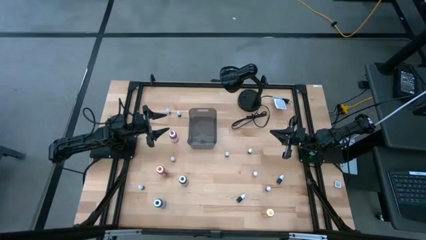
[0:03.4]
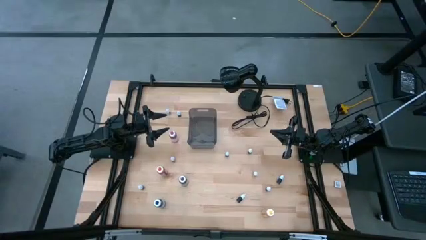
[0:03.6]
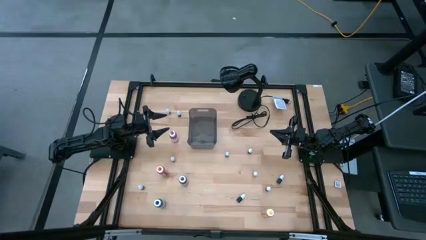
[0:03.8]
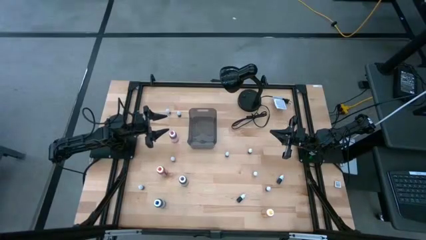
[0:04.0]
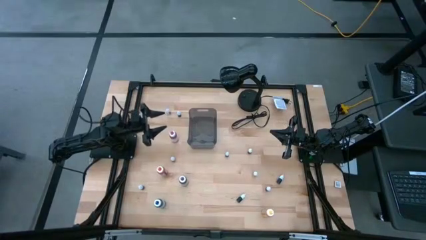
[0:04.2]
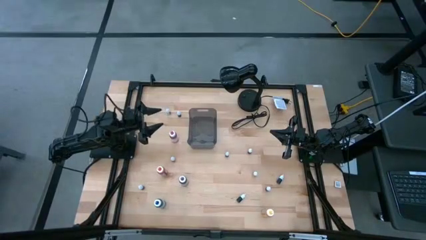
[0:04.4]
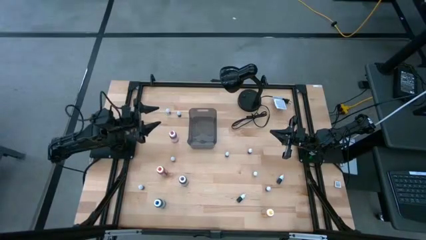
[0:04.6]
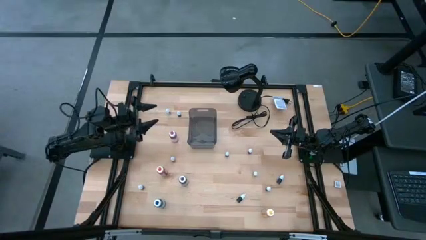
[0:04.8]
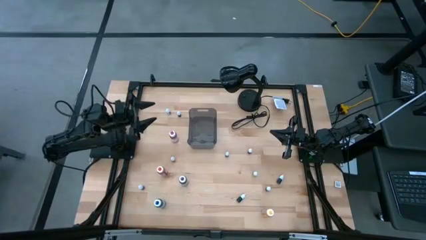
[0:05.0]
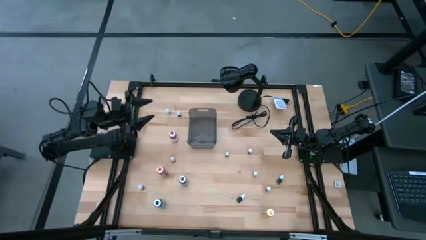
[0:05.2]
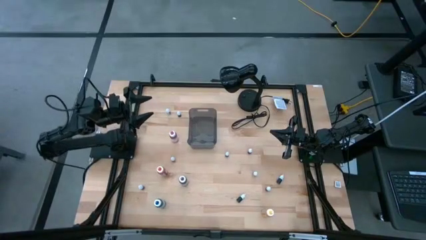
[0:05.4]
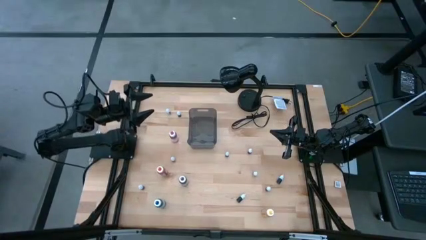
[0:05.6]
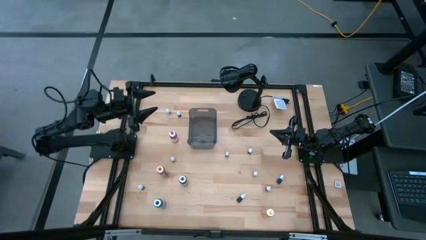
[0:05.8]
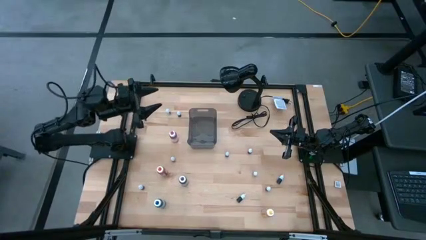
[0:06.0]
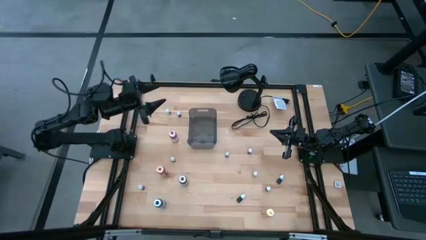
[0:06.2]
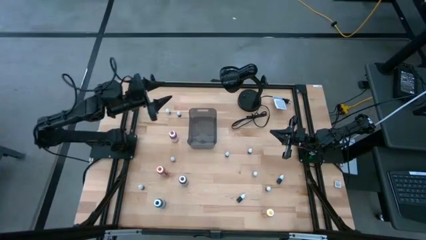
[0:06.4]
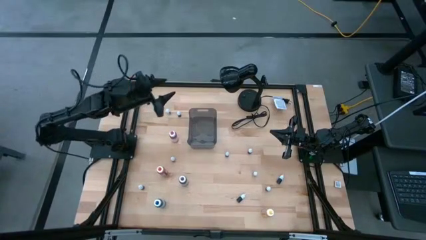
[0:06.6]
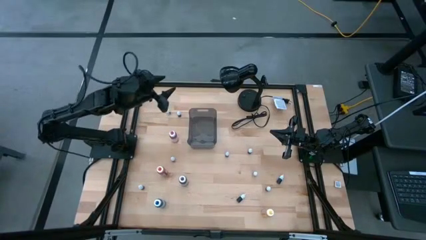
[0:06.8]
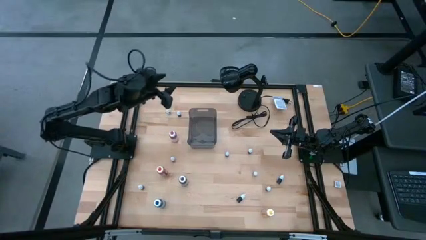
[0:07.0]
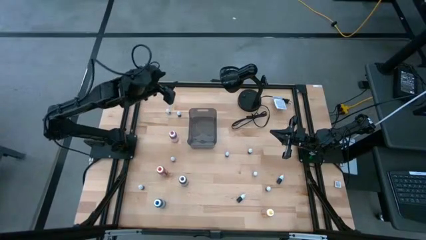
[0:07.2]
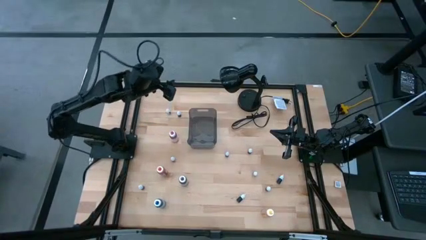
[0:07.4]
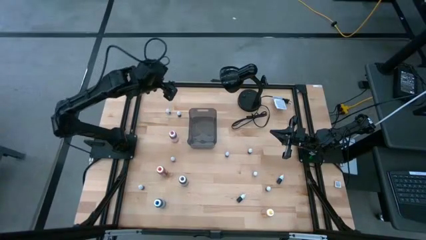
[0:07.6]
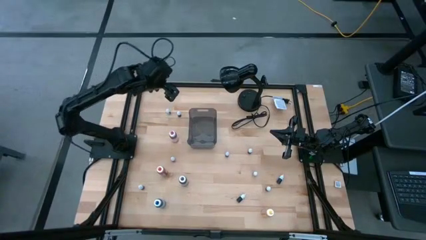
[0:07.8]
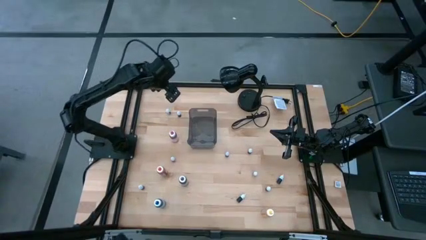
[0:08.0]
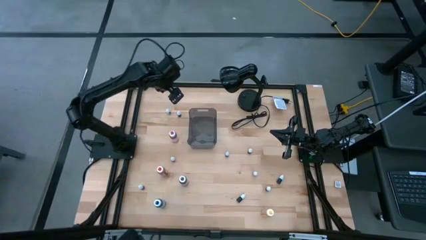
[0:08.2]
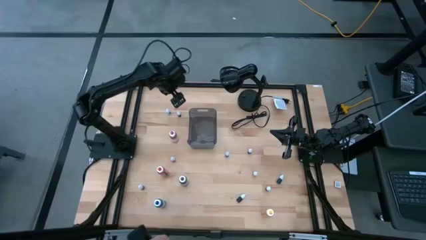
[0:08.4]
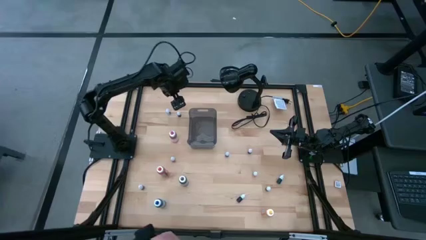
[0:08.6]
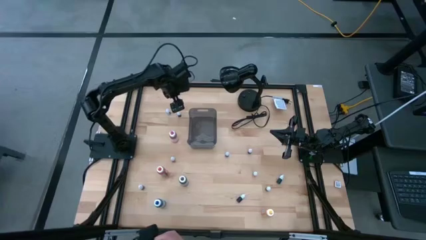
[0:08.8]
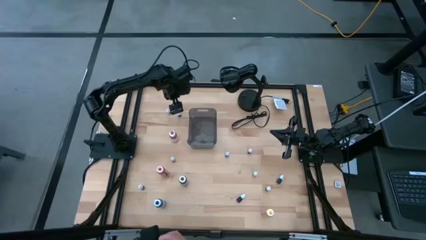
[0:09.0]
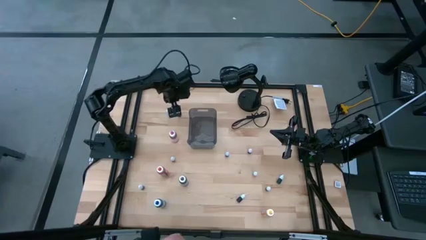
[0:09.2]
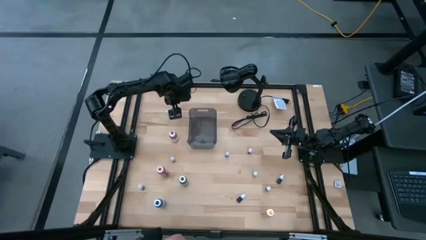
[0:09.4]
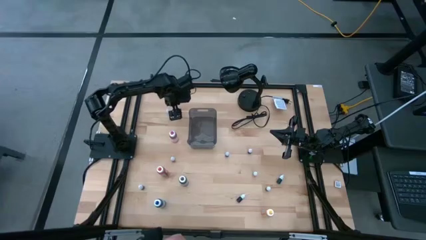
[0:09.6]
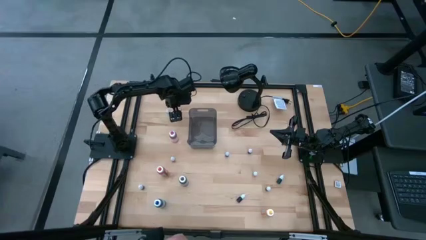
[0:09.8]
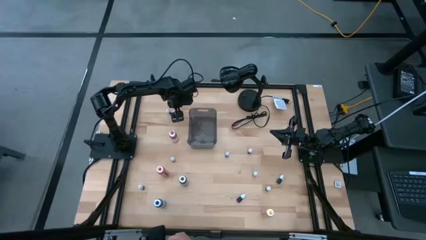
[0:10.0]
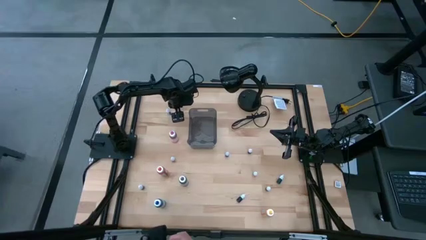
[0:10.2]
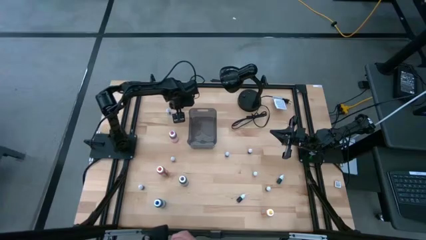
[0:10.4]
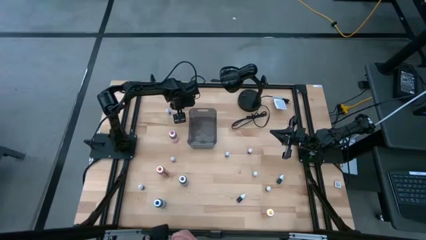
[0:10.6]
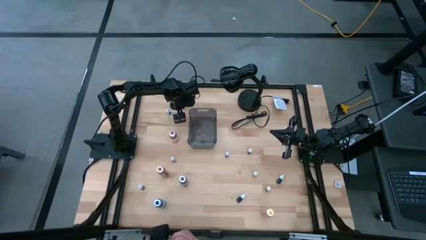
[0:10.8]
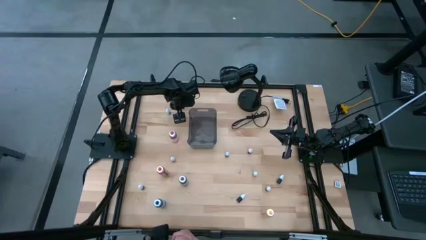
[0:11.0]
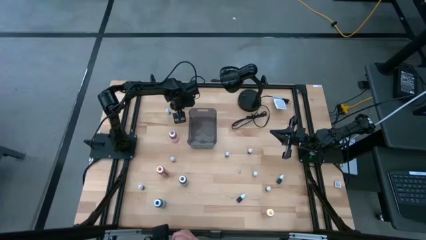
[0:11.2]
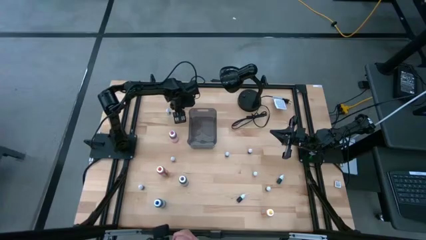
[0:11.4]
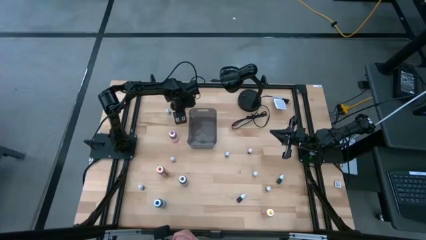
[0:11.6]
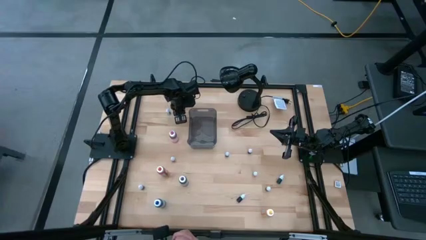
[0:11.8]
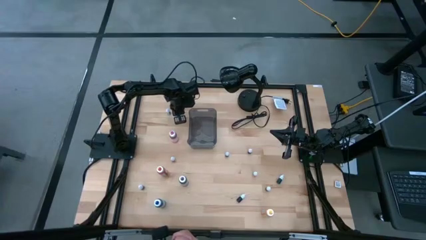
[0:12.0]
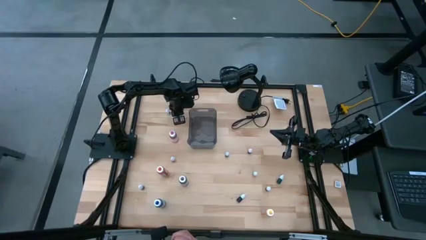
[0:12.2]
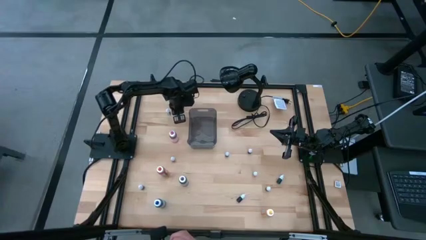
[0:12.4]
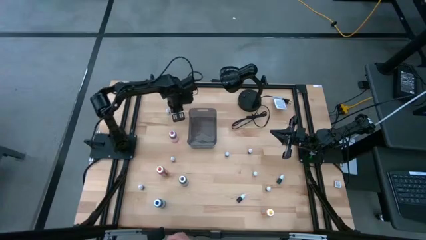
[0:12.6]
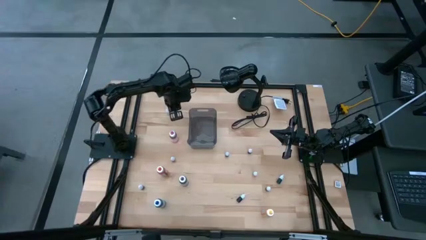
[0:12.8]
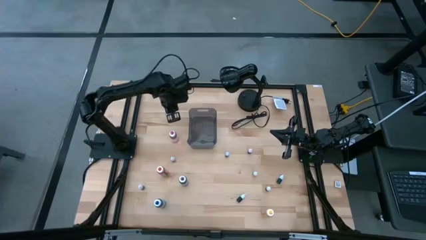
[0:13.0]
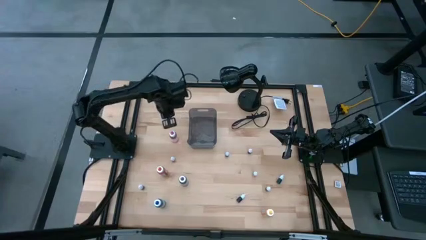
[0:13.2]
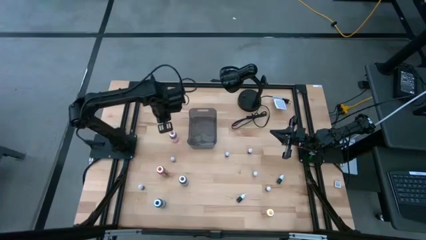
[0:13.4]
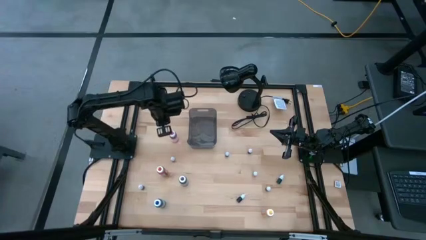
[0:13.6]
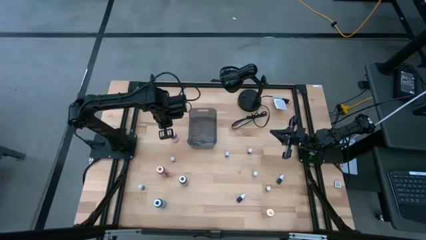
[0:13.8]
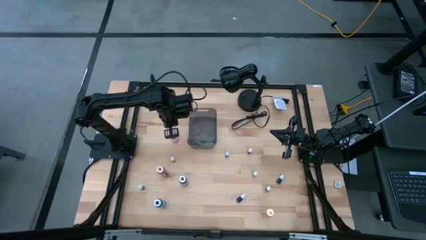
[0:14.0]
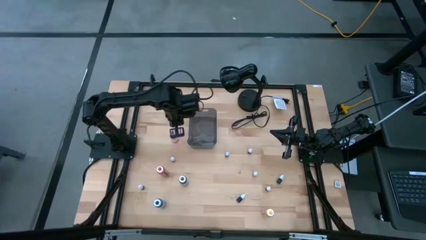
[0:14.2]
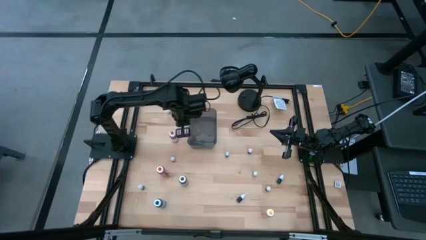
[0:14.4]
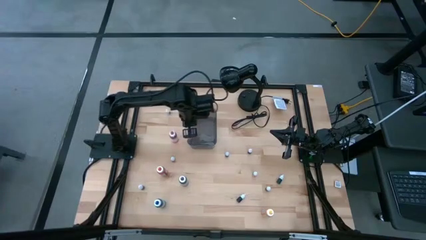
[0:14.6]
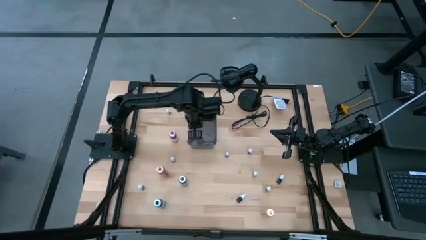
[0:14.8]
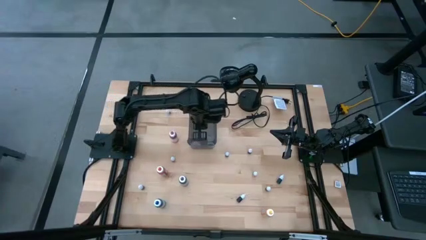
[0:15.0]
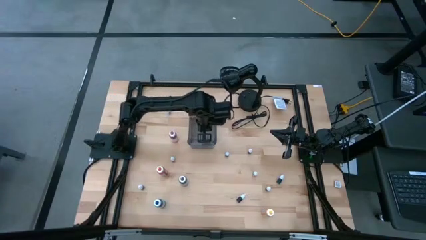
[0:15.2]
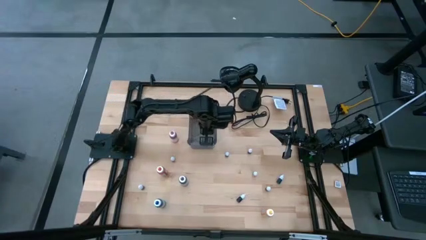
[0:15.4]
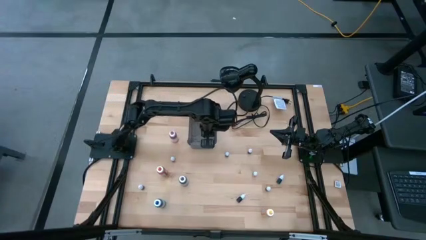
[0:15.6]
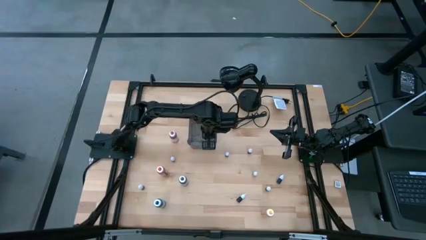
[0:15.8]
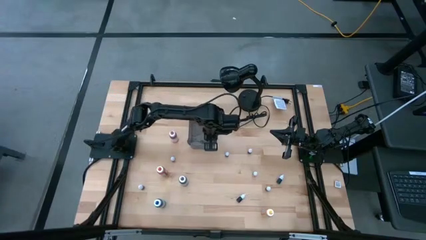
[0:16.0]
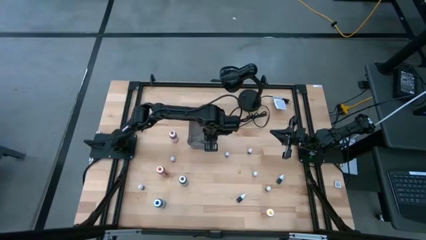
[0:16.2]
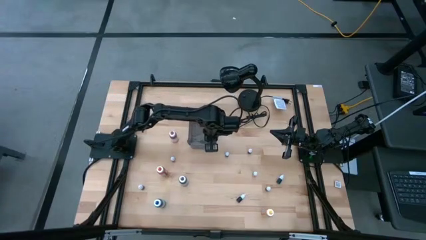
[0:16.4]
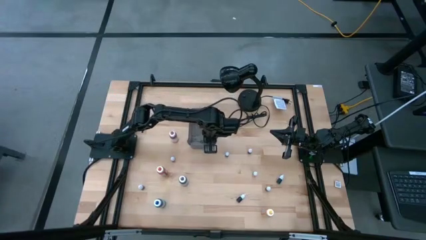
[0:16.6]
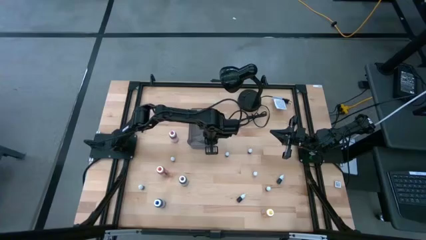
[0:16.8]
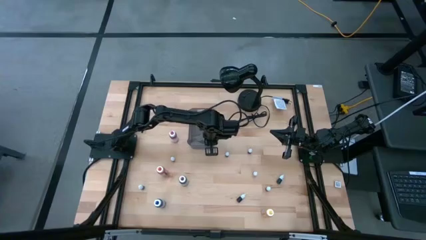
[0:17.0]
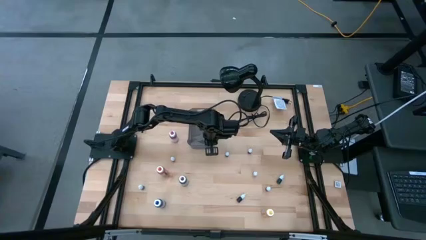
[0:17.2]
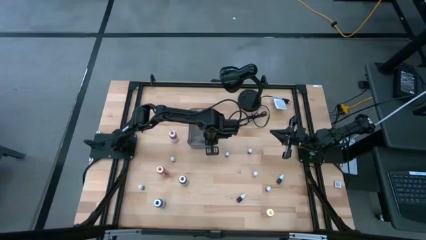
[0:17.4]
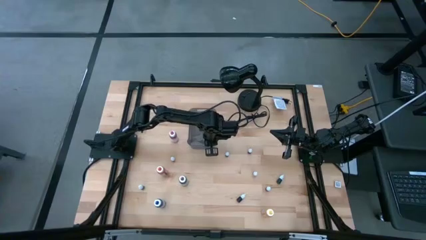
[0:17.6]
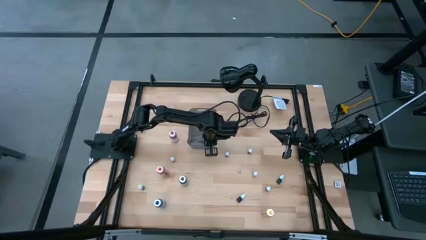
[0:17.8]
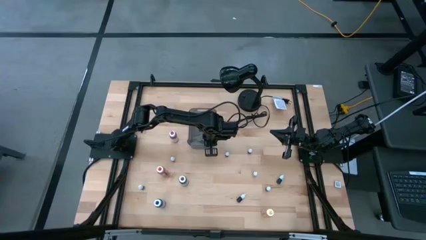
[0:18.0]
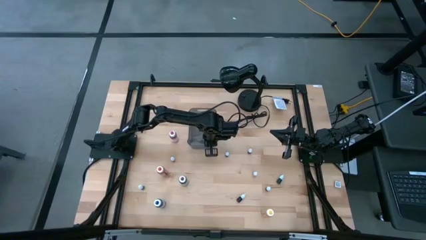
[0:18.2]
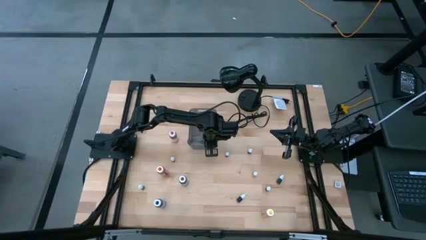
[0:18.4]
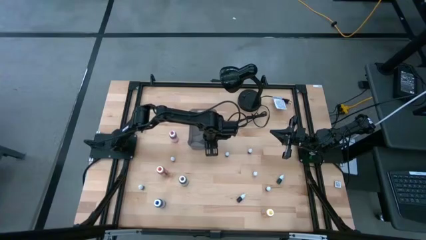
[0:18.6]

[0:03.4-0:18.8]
Task: Pick & Place food coloring
Put the top small red food coloring bottle into the gray transparent bin
